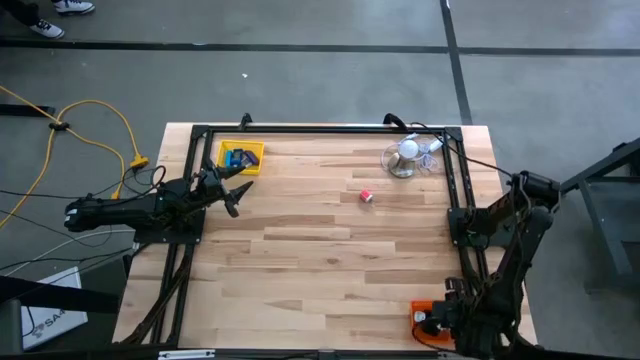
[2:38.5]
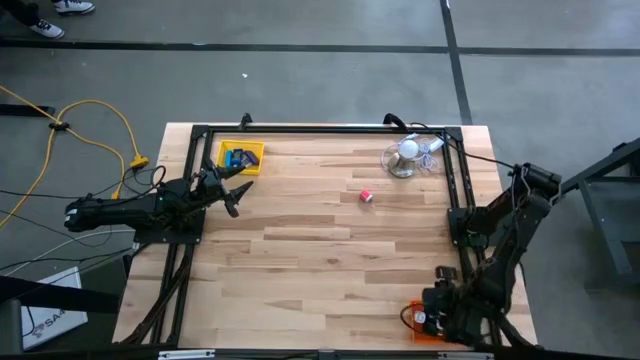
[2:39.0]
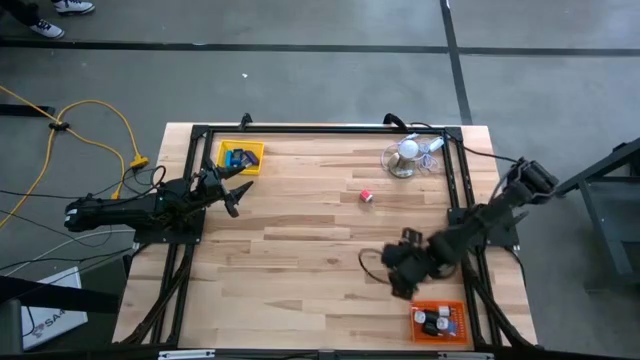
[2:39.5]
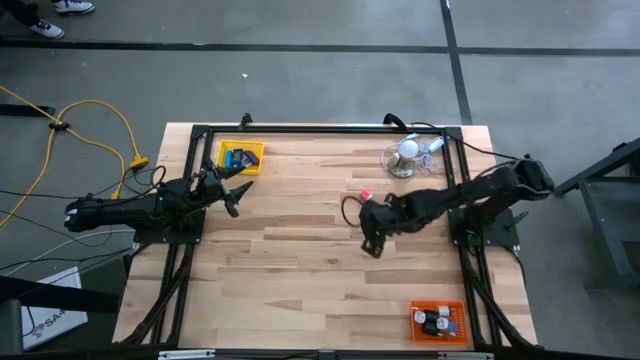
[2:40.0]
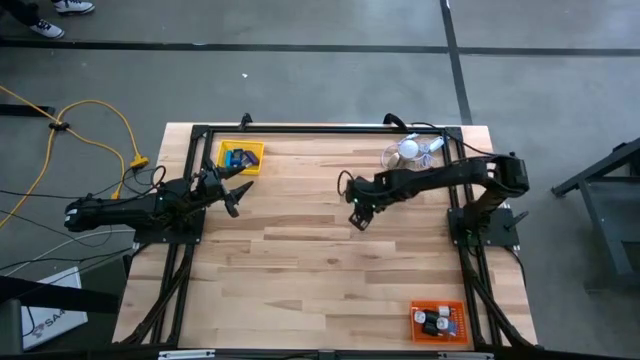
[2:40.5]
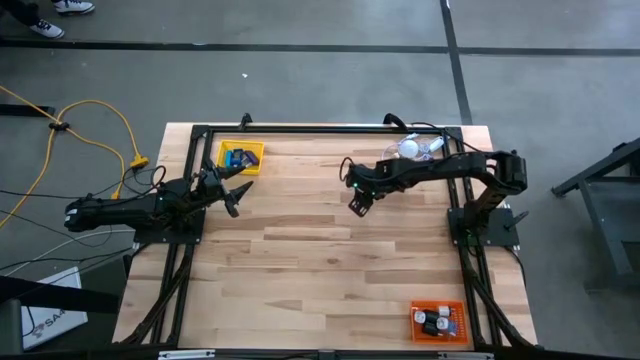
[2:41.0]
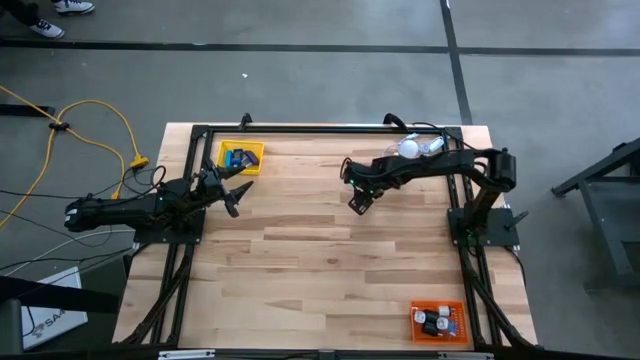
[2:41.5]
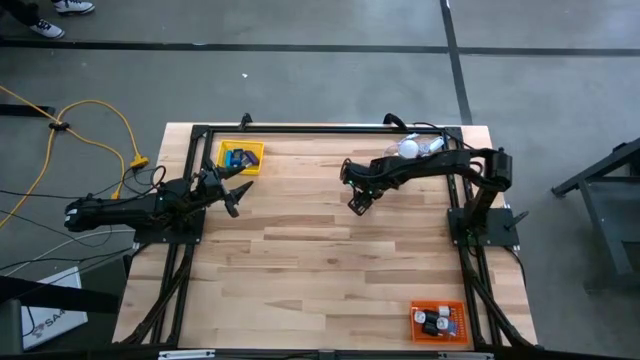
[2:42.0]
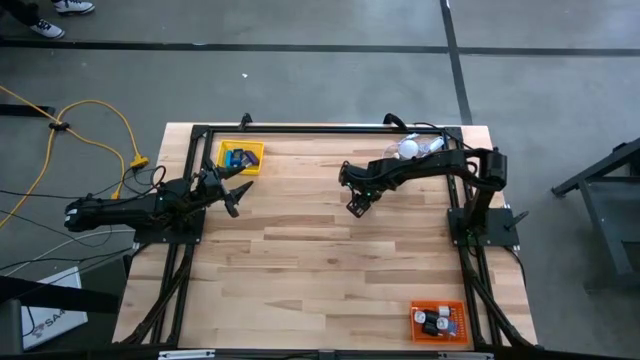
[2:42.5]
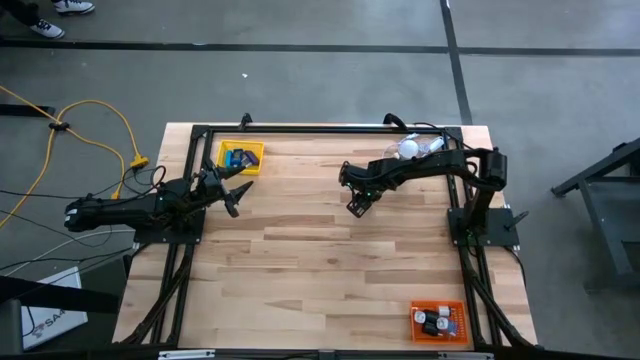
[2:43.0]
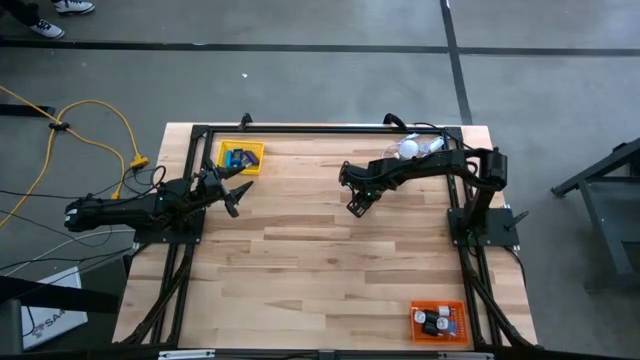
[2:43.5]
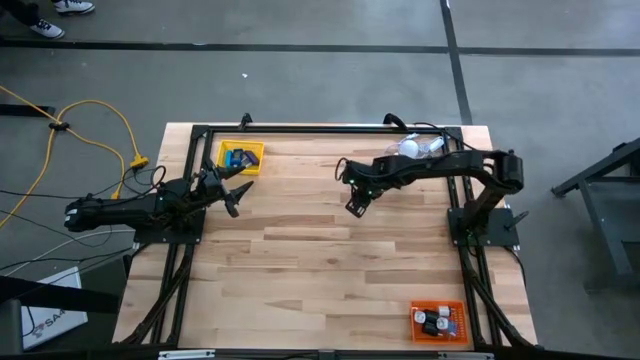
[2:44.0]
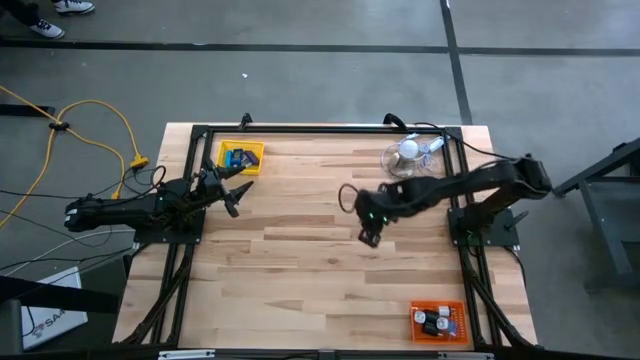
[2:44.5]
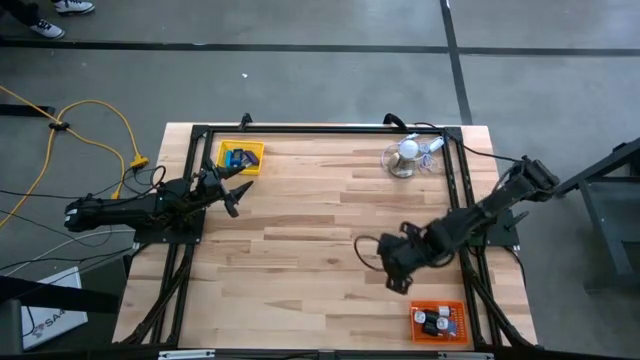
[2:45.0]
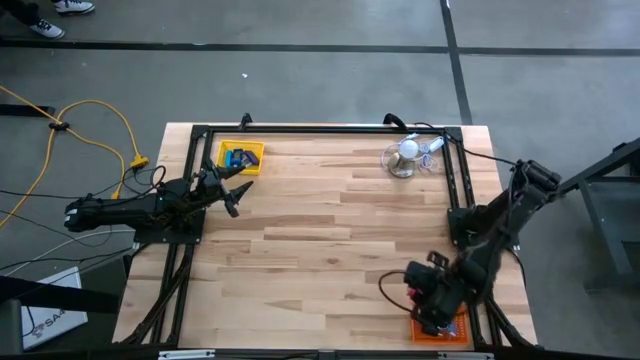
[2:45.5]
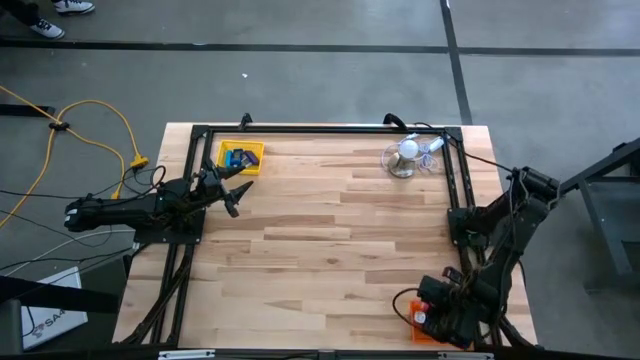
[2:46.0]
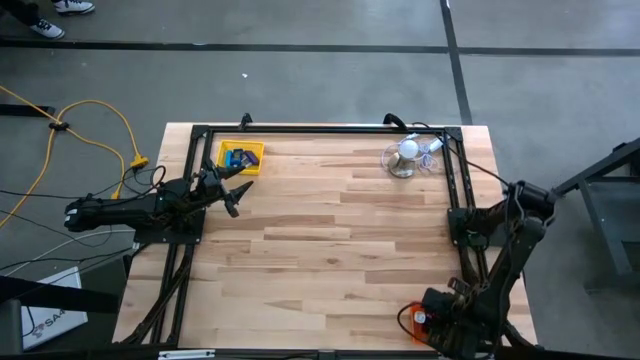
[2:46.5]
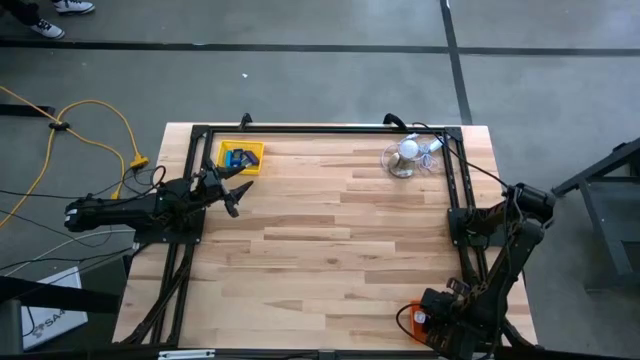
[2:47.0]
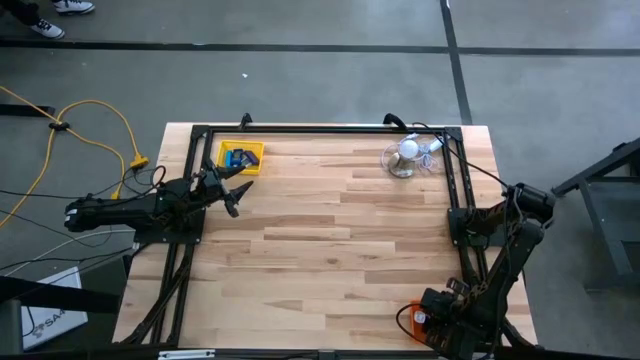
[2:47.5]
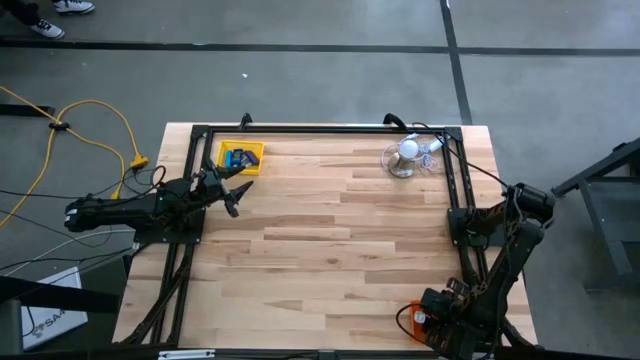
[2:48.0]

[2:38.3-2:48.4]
Task: Pick & Place Office items
Put the pink charger adapter into the orange bin

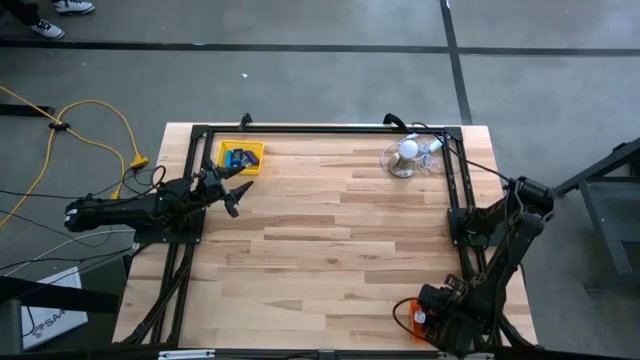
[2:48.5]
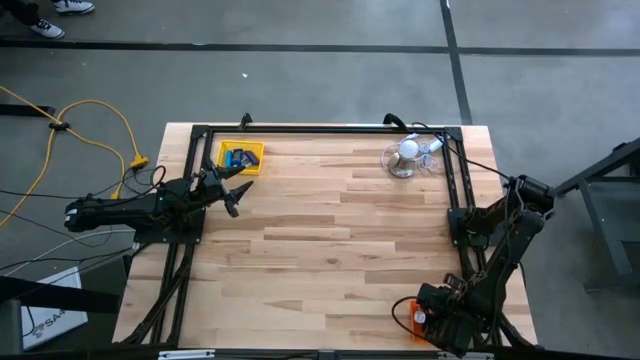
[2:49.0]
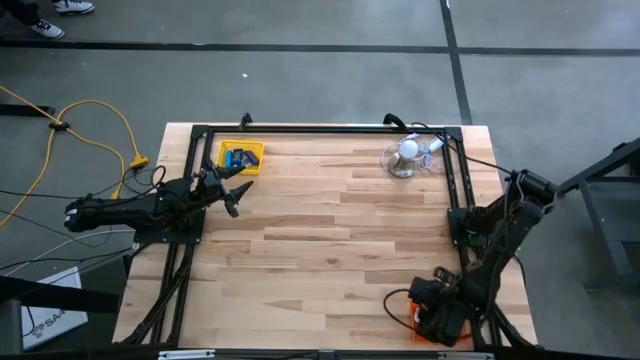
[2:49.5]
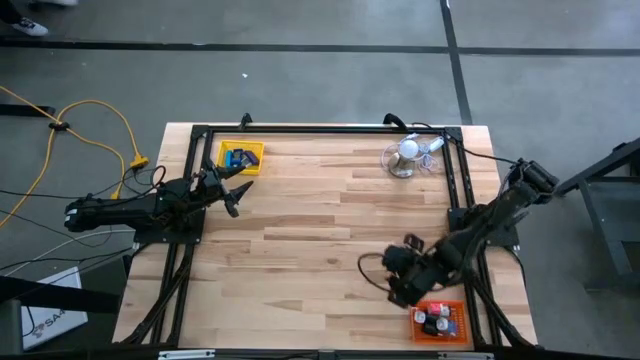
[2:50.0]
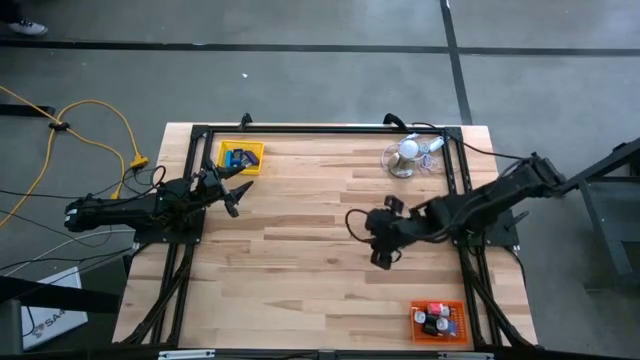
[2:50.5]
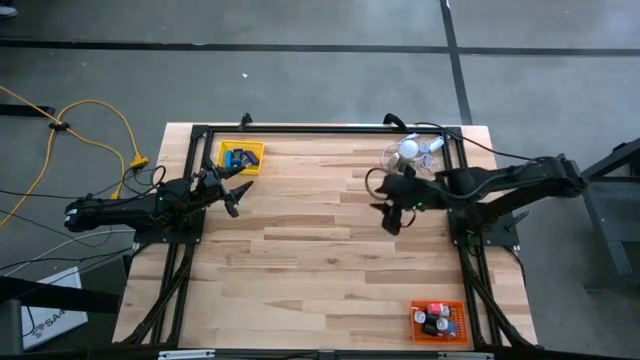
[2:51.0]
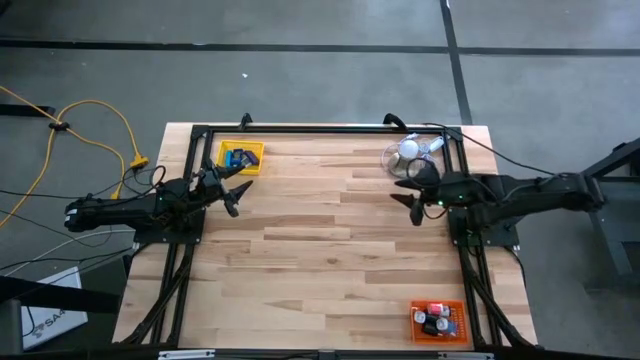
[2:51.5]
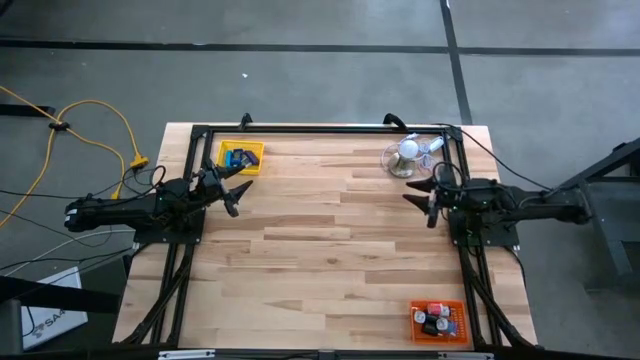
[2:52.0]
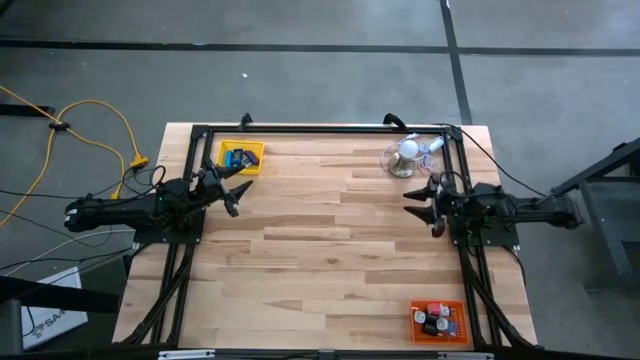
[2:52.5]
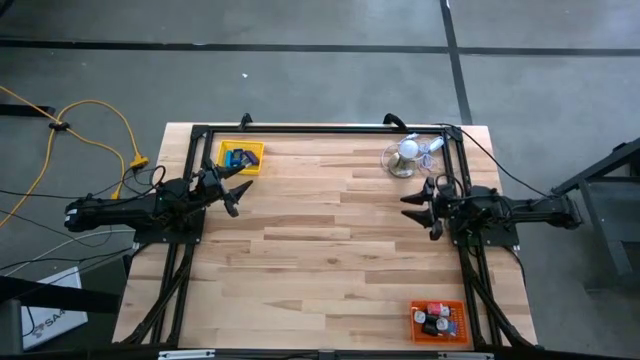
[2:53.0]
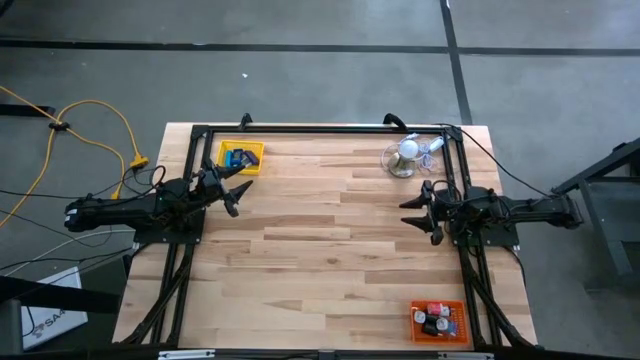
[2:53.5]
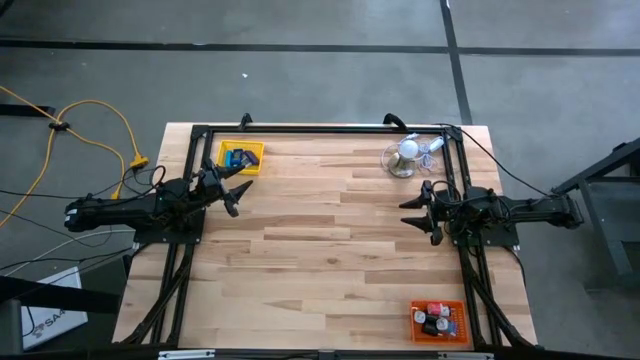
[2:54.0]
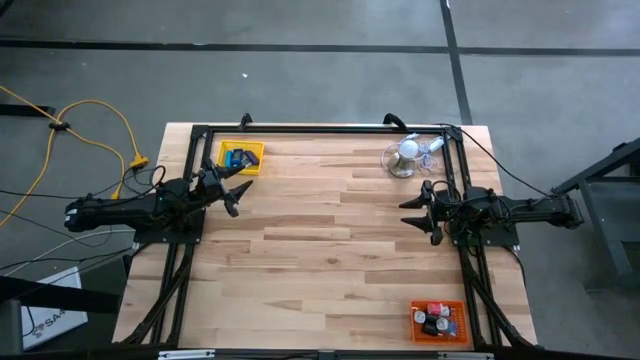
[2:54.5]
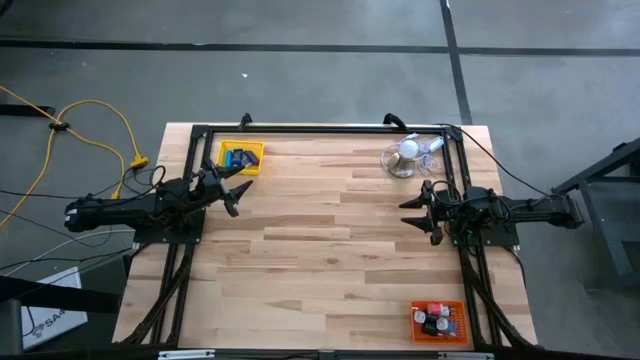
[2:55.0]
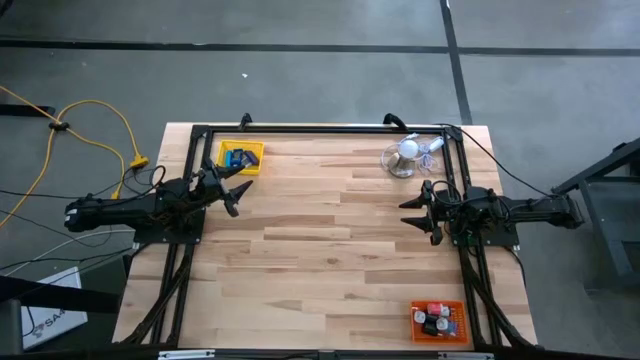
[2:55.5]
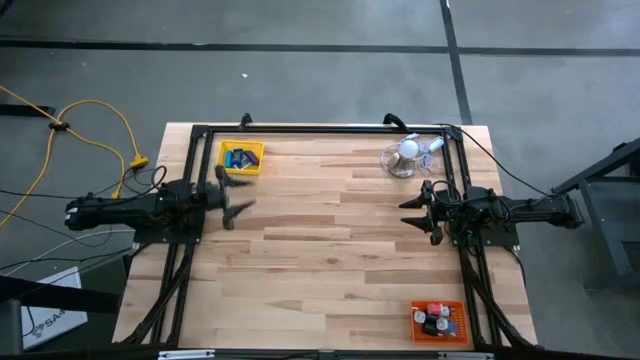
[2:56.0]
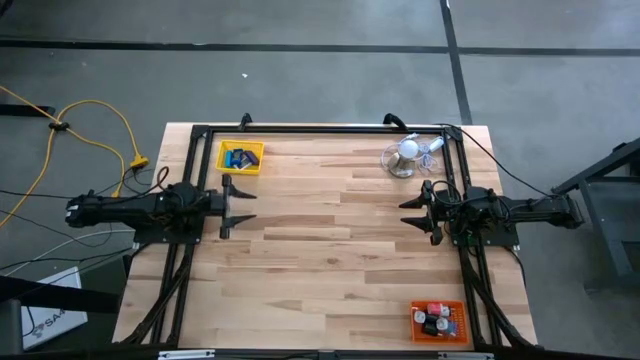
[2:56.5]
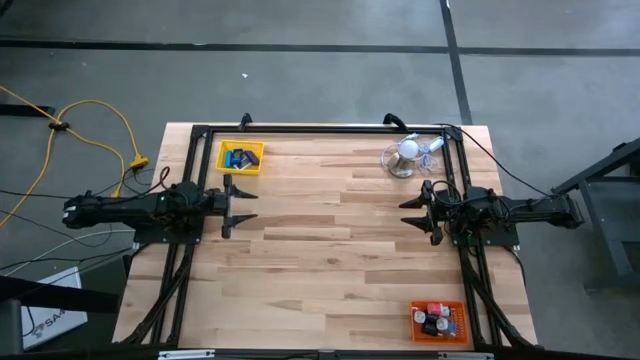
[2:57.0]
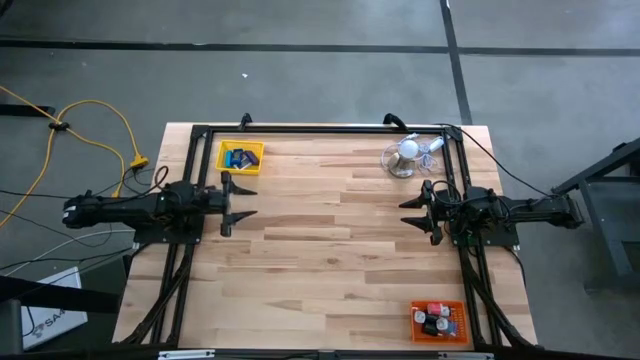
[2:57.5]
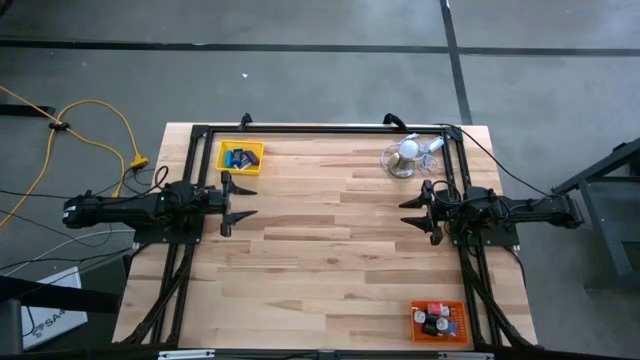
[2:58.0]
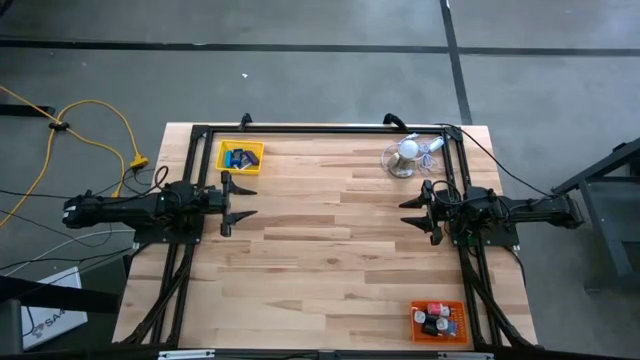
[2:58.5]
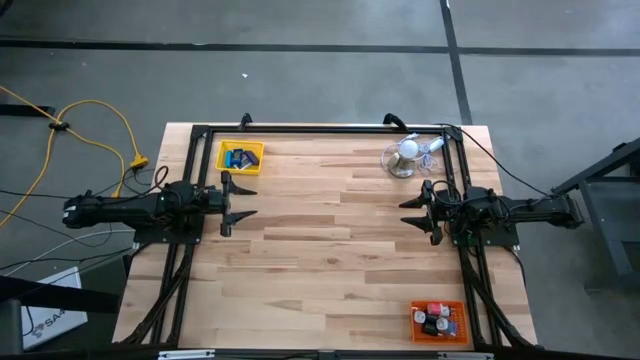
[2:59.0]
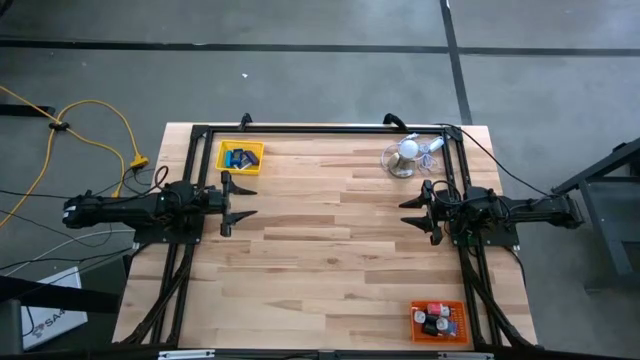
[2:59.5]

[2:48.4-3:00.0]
Return to Home Position
